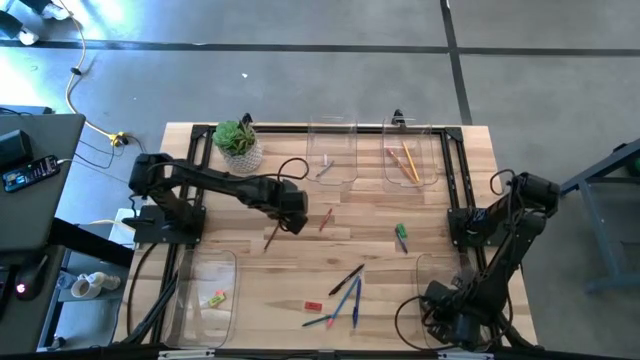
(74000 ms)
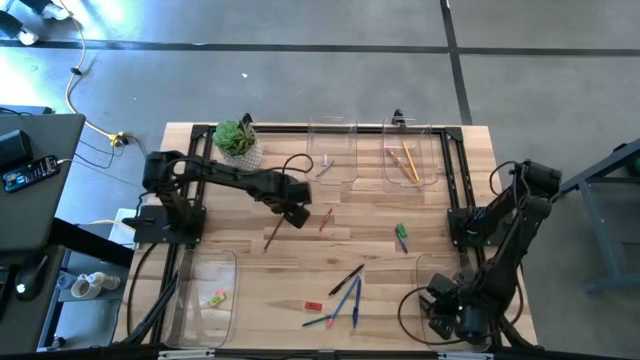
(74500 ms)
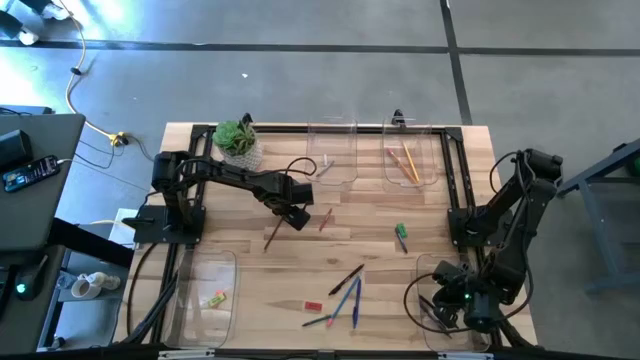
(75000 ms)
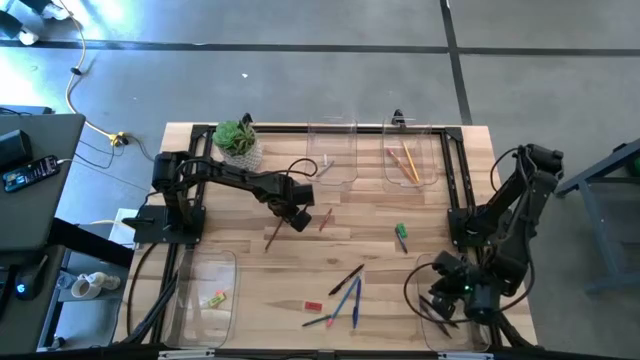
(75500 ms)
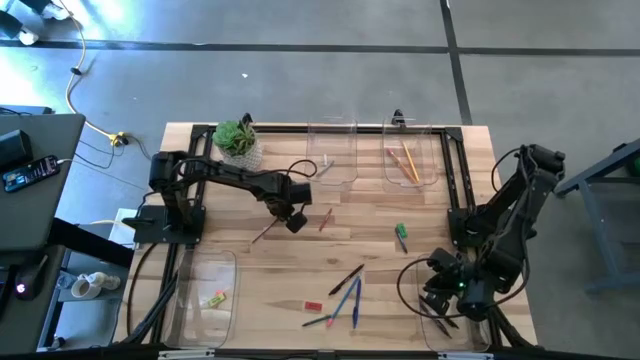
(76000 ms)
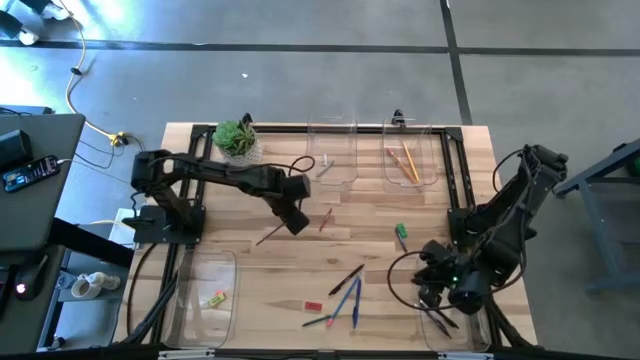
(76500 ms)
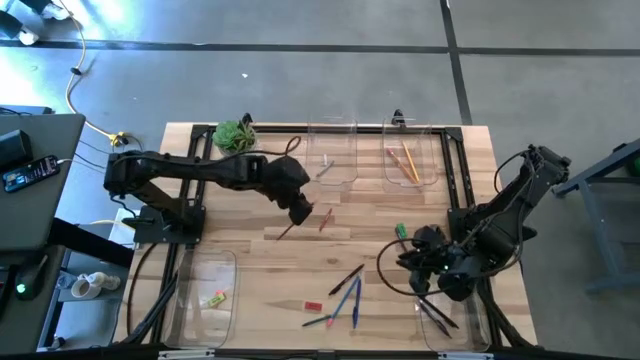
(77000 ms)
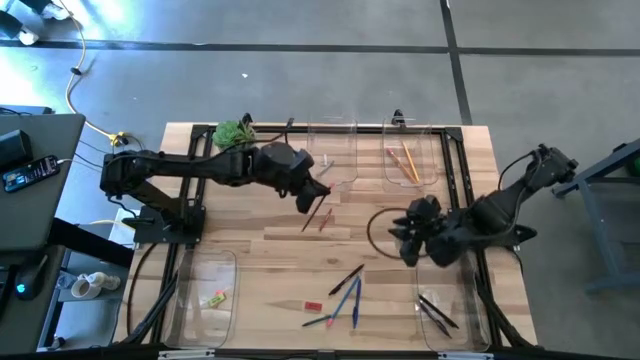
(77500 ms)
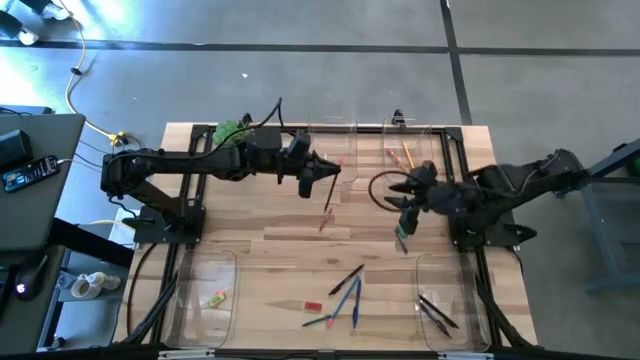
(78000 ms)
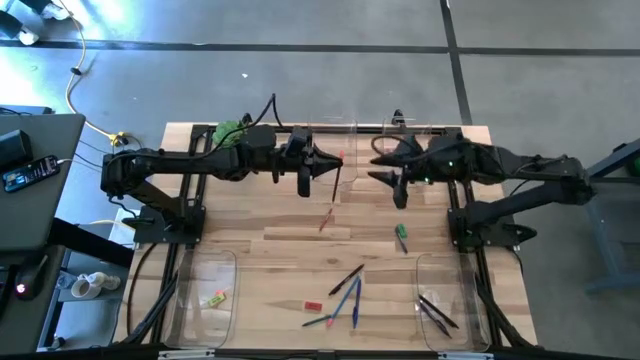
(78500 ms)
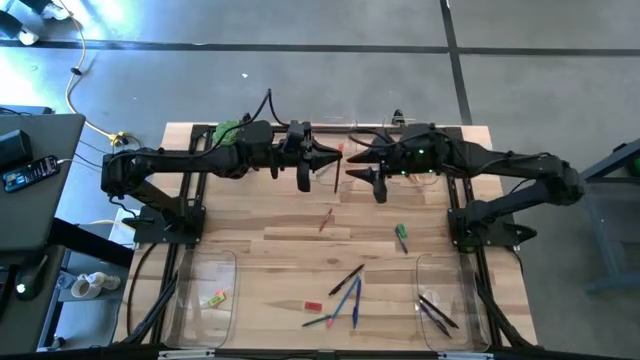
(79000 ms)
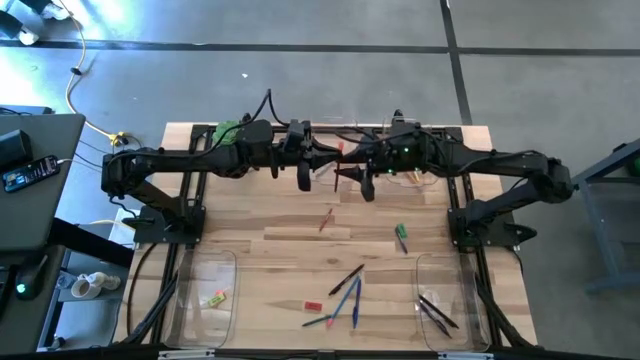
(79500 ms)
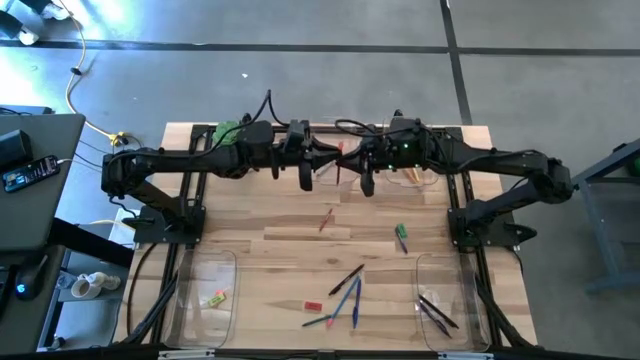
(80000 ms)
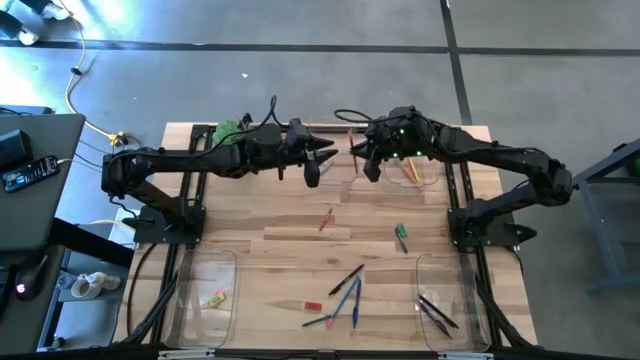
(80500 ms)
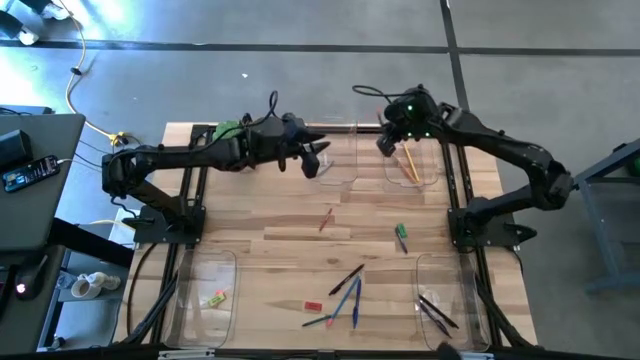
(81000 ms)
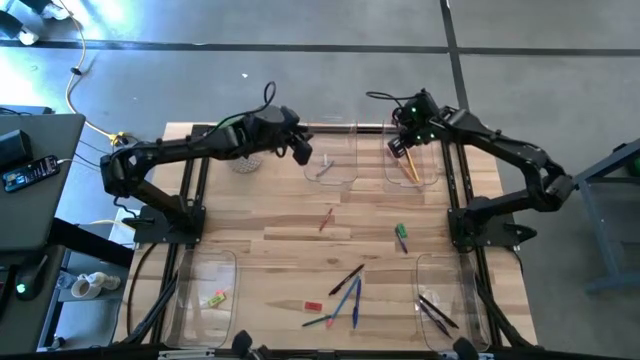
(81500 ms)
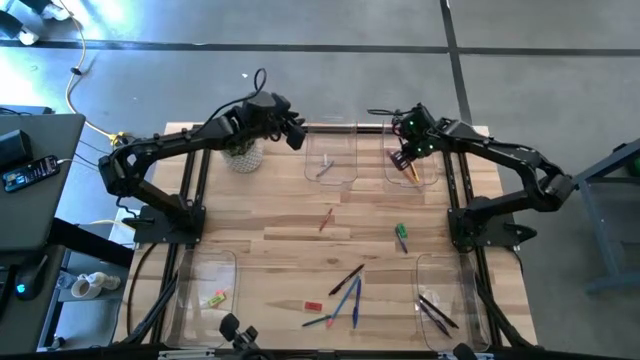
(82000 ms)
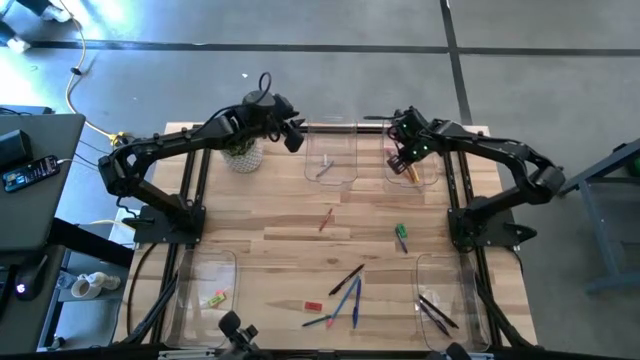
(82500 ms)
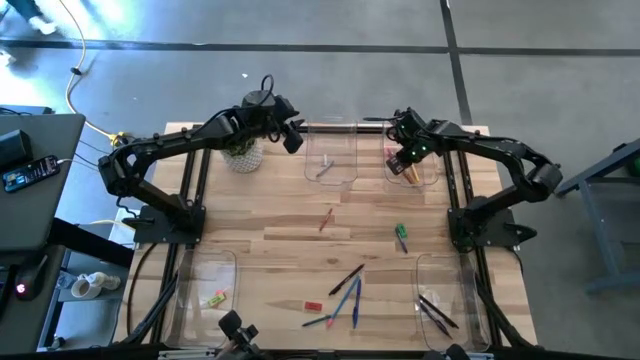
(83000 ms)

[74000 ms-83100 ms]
Task: Sort crayons/erasers/pens/pencils in bins
Put the brown pencil into the top right transparent bin

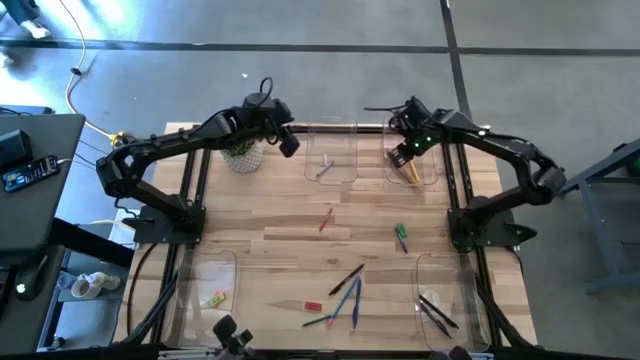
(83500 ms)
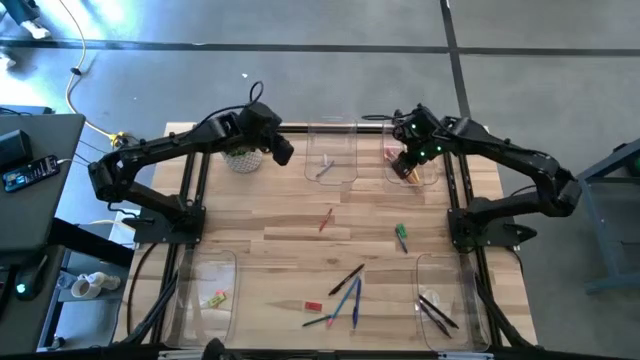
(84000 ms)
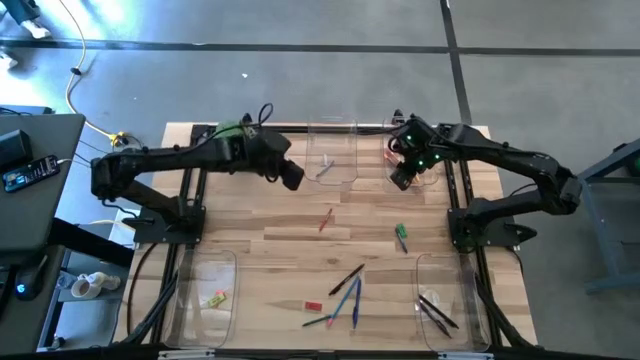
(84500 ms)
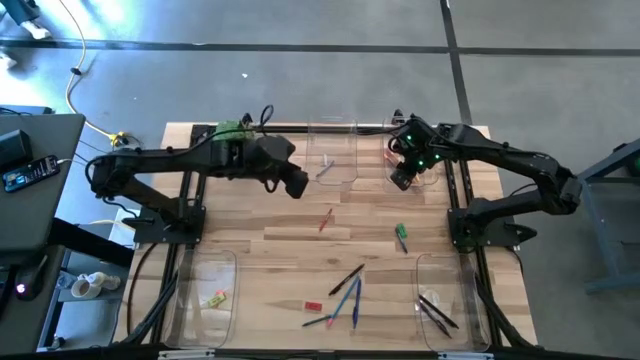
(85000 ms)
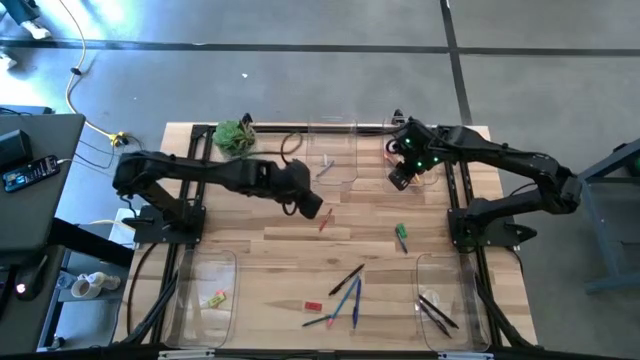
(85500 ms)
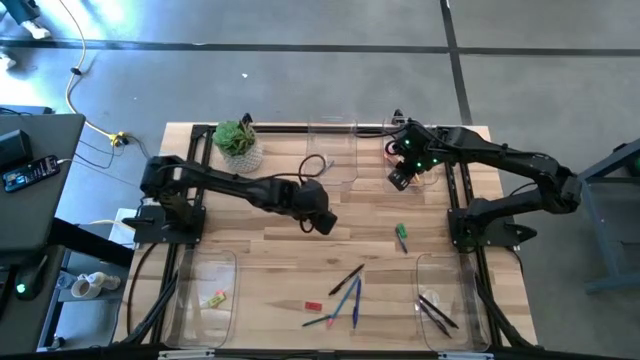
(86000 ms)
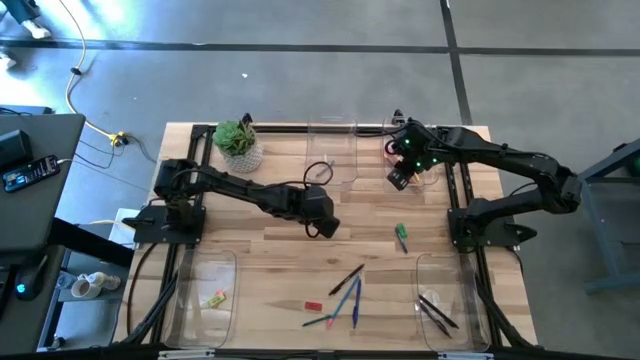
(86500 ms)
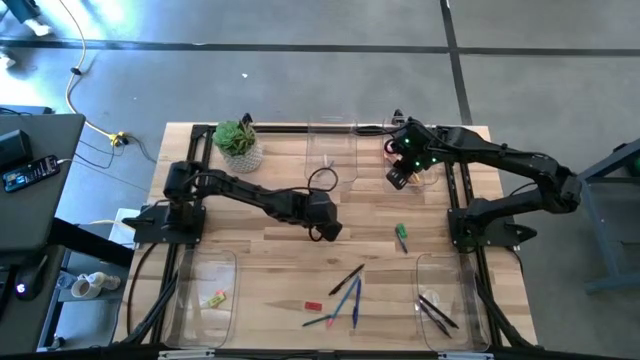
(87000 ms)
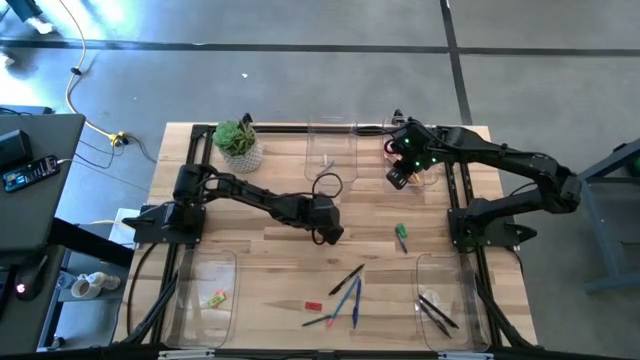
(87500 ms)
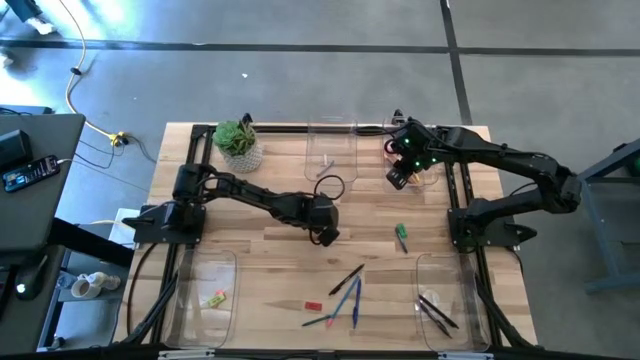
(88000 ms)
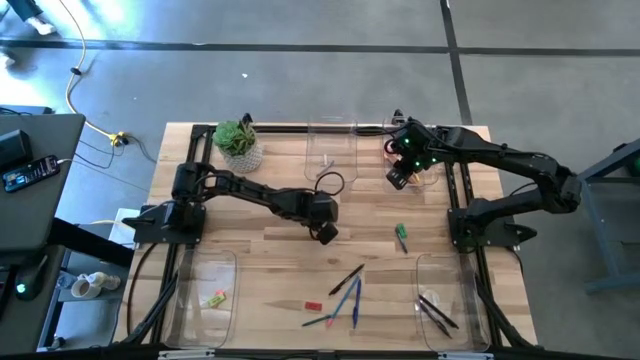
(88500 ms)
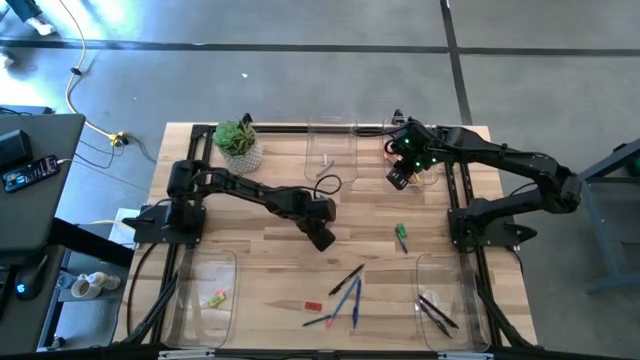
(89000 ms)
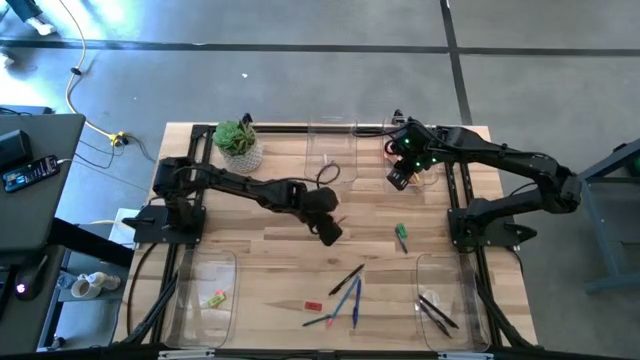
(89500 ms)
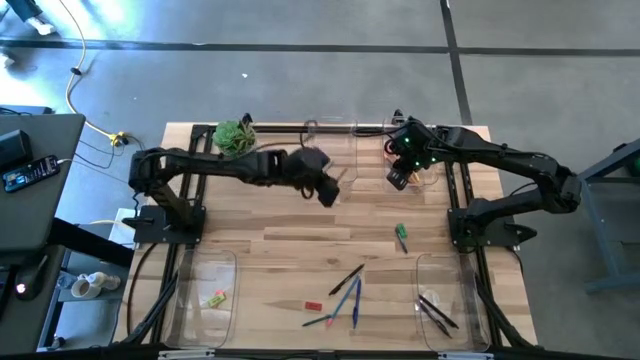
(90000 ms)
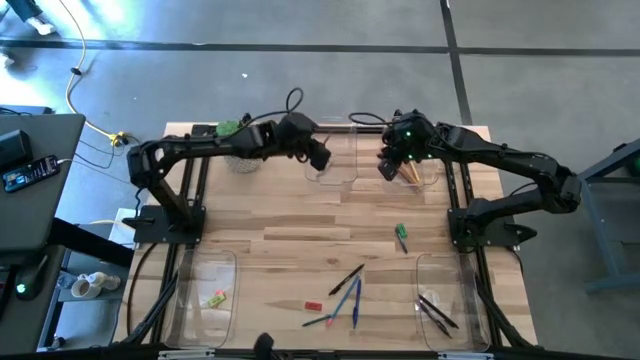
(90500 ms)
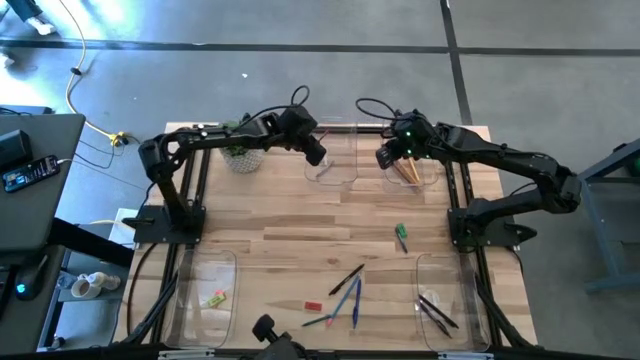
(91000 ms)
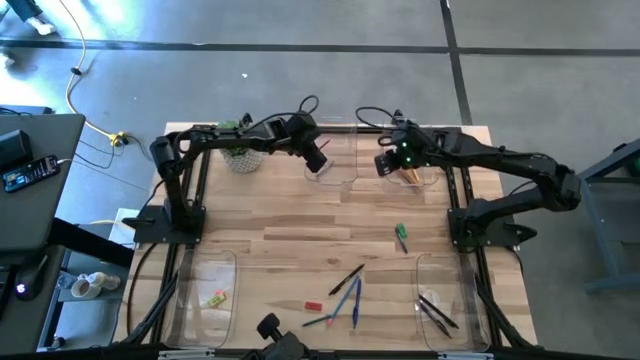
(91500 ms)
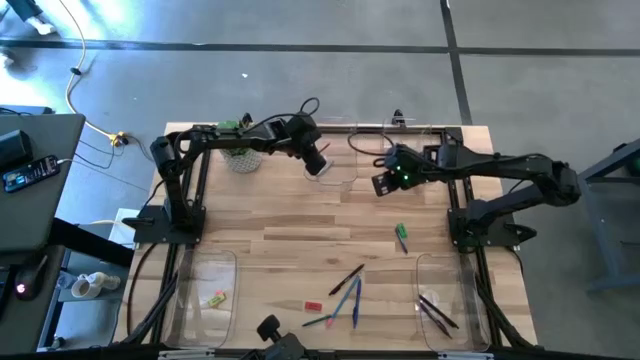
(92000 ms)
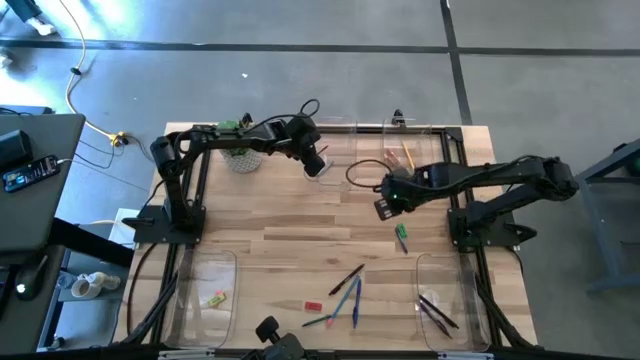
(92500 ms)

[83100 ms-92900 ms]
Put the red crayon into the top left transparent bin

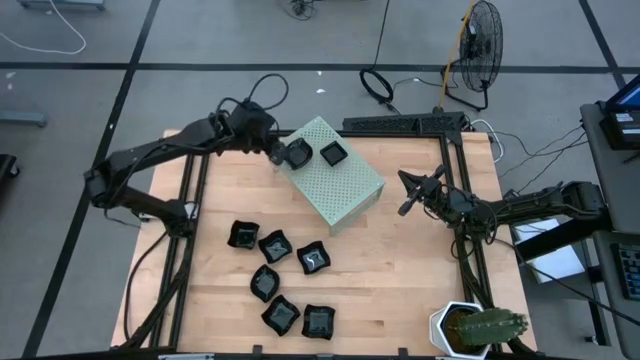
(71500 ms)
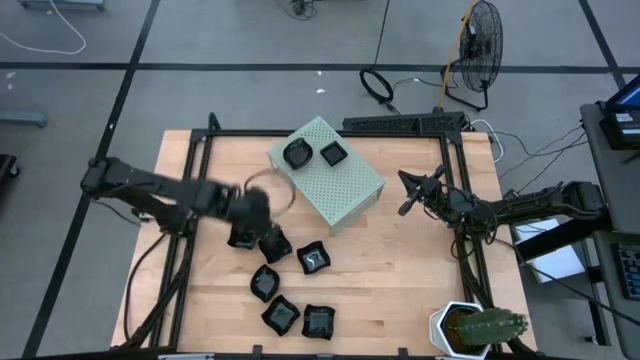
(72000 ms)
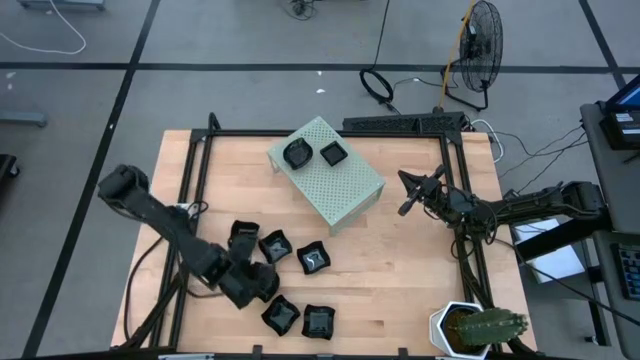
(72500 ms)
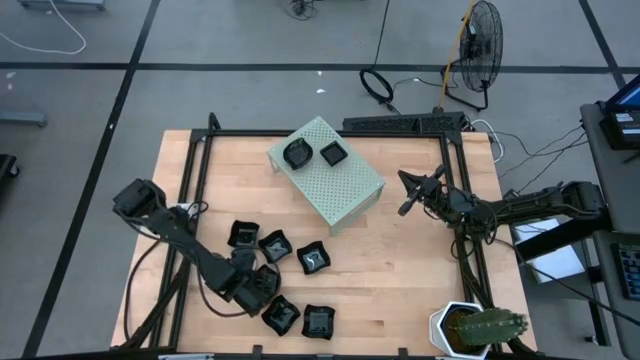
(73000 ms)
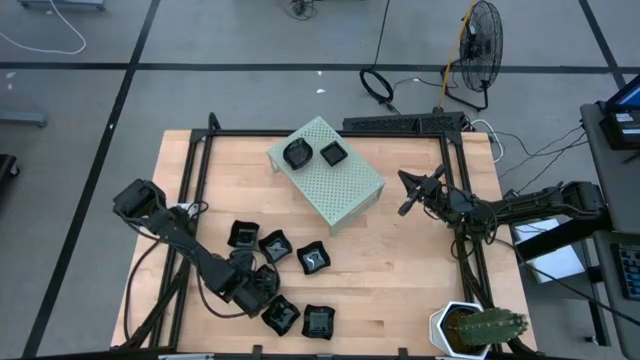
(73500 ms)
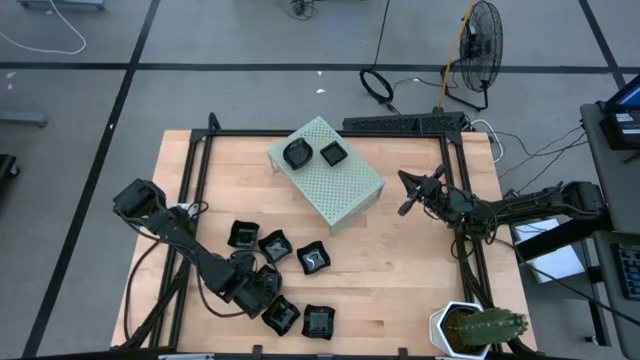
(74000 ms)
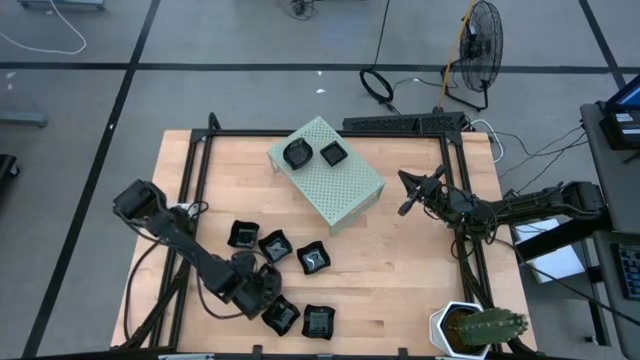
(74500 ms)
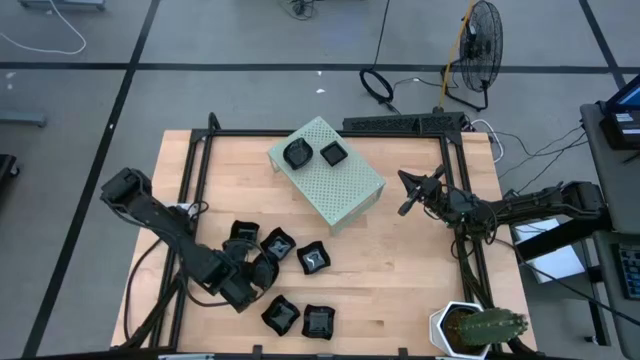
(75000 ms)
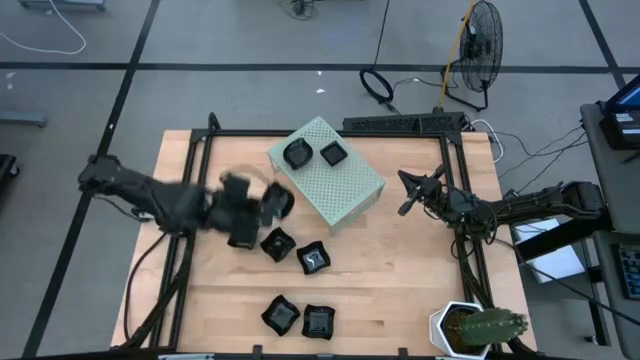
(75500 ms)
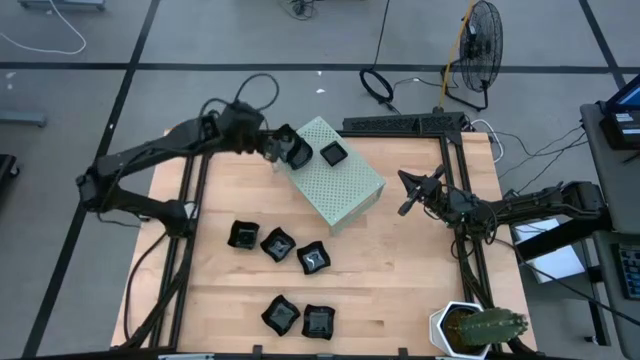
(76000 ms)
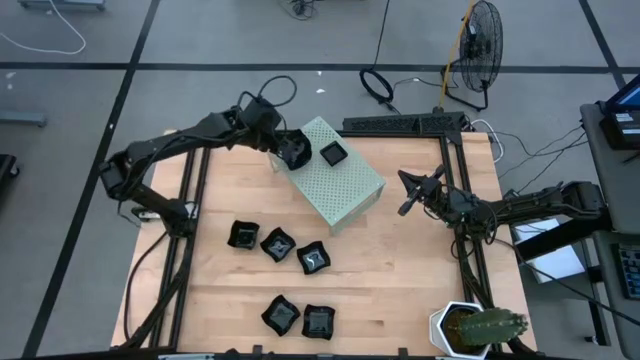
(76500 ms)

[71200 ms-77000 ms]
Task: Pick & Place Mini shaped plates
Stack the leaf-shaped plate on top of the other leaf-shaped plate on the shelf
